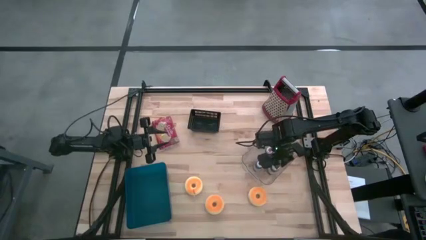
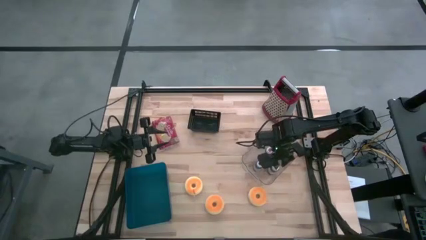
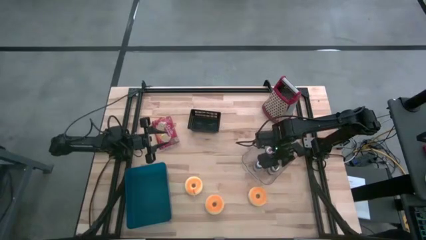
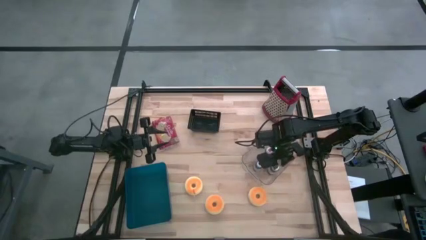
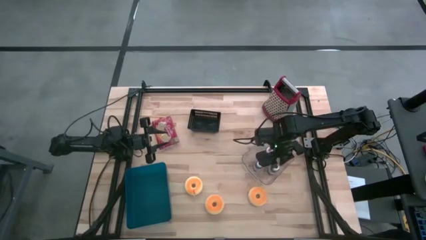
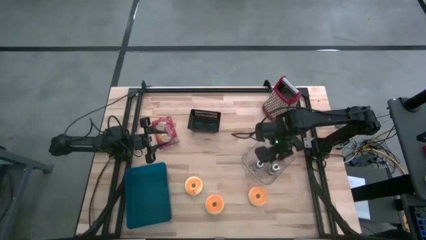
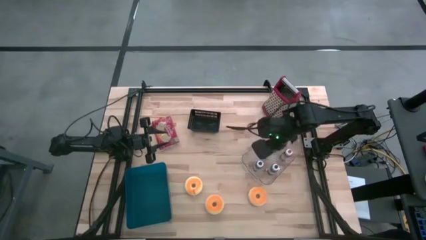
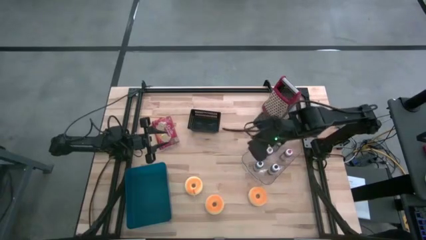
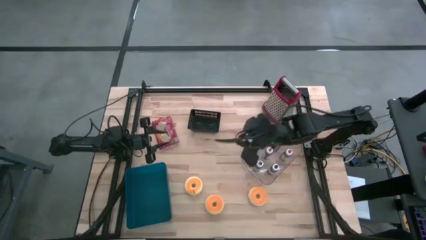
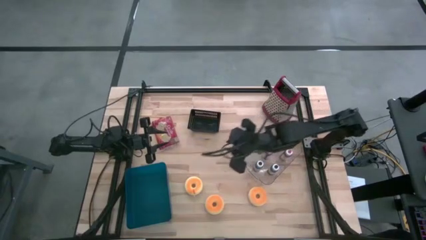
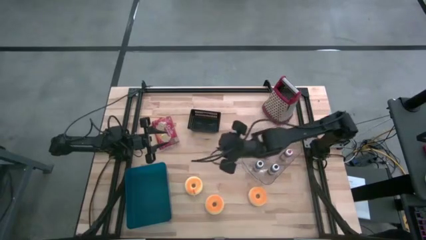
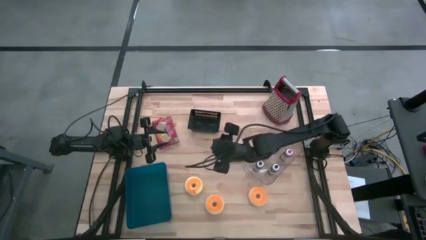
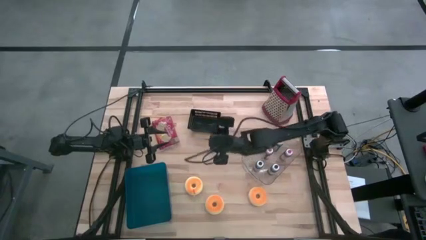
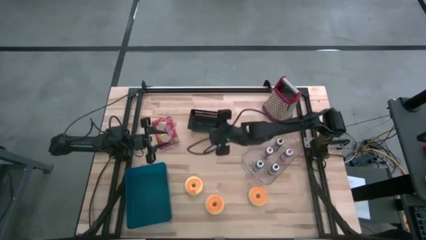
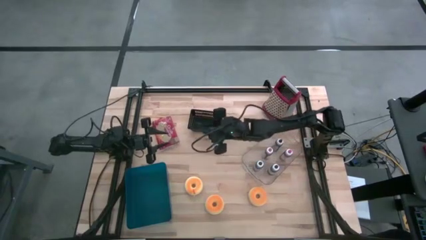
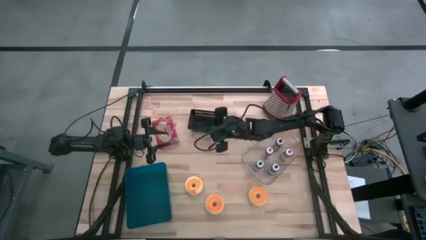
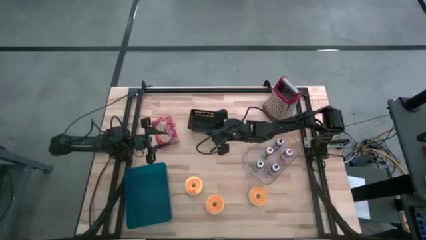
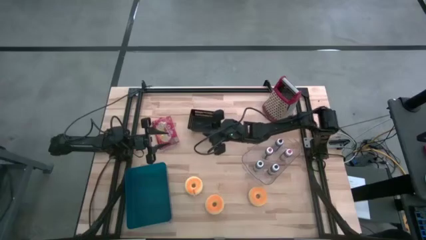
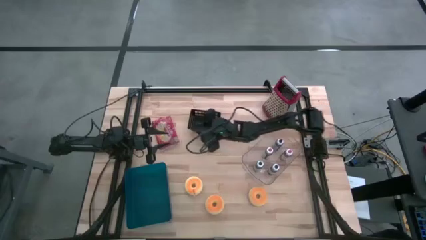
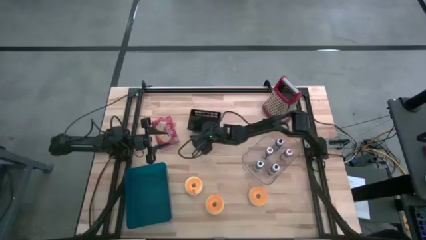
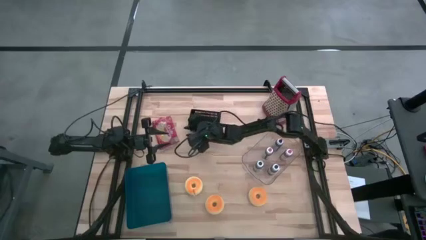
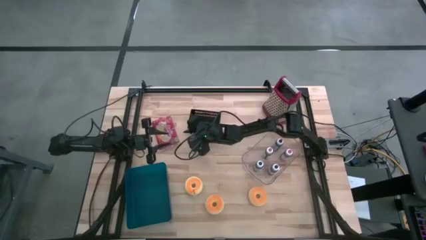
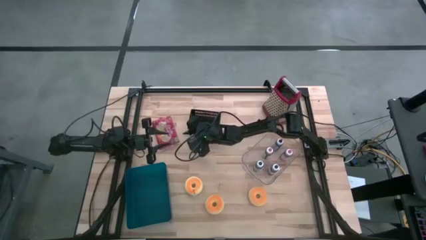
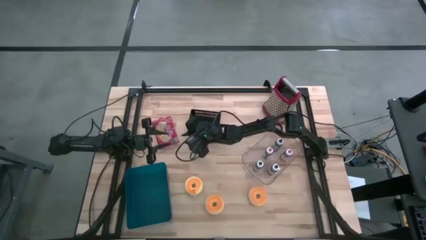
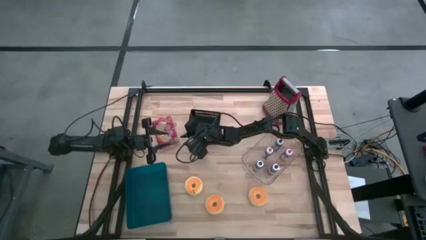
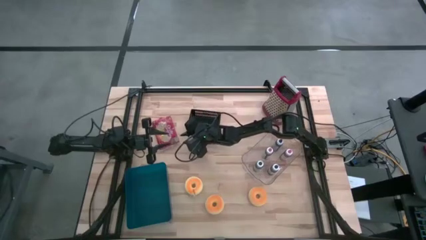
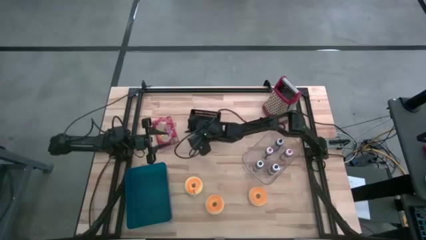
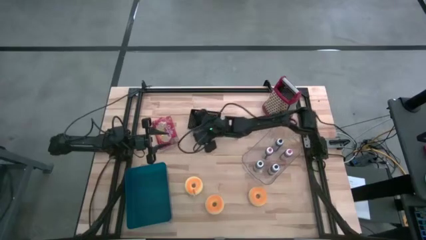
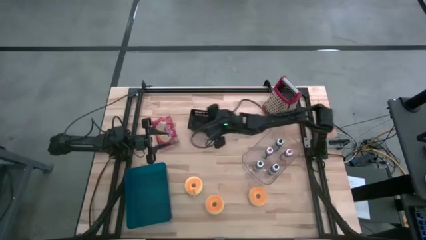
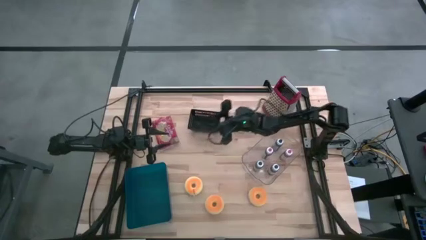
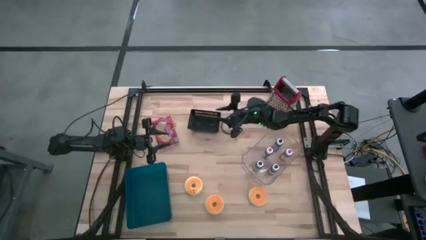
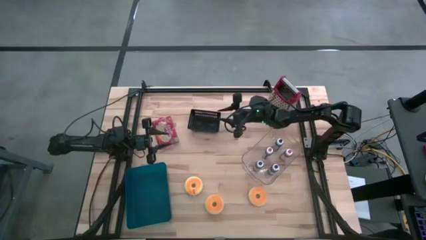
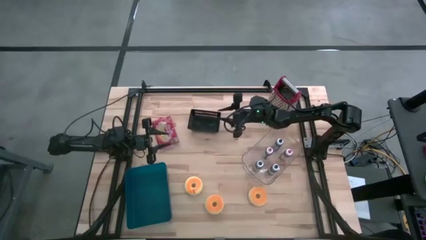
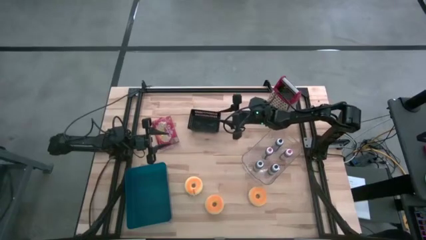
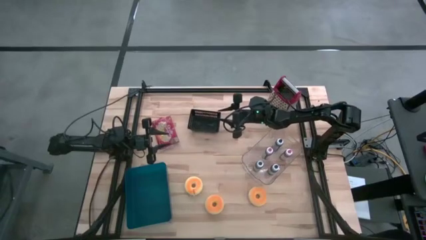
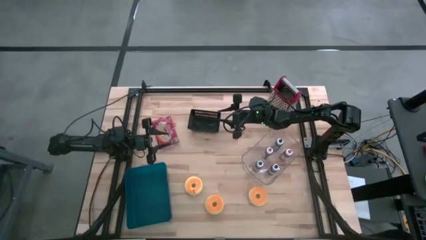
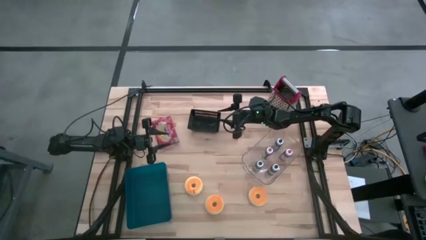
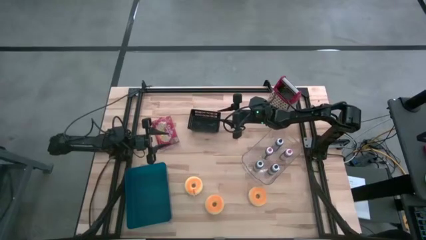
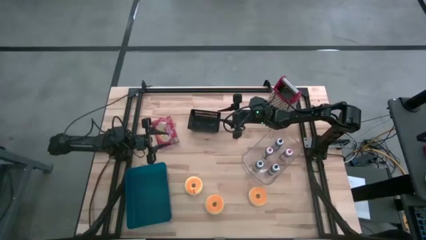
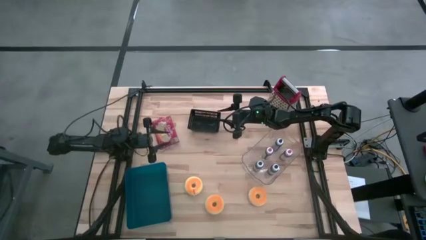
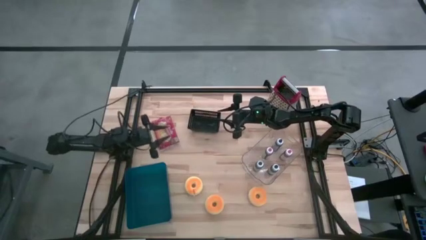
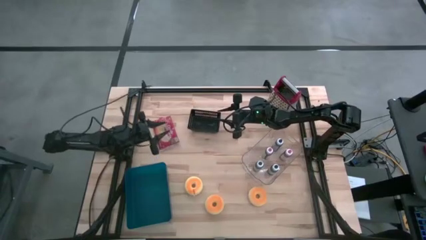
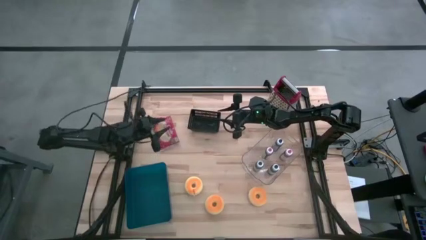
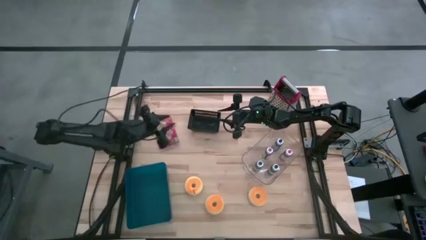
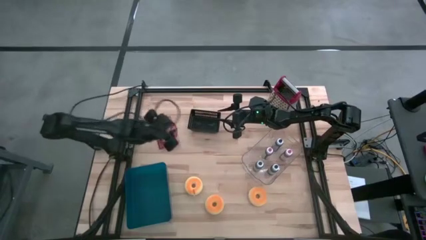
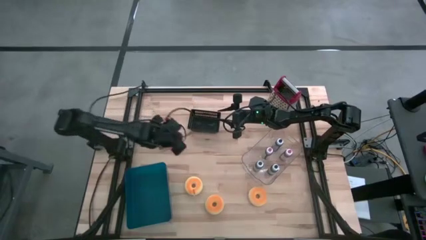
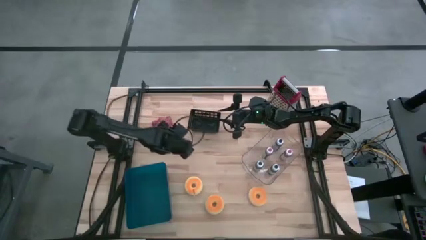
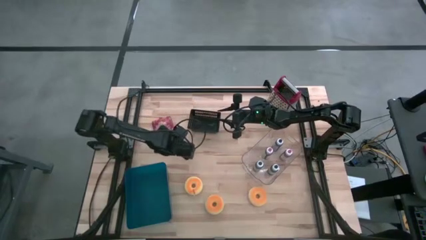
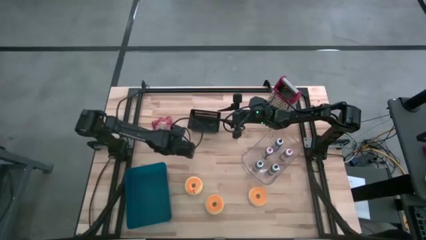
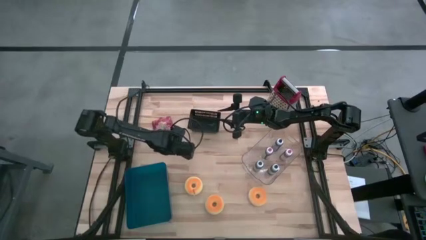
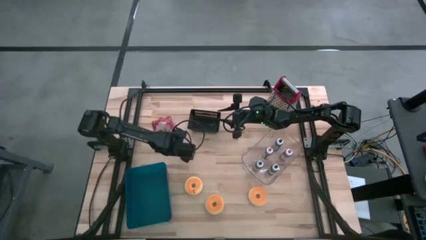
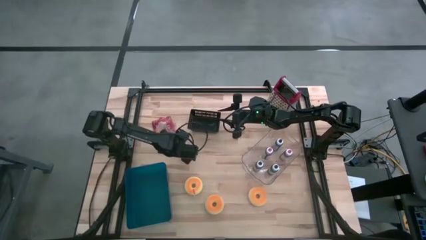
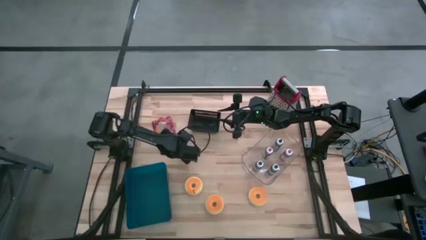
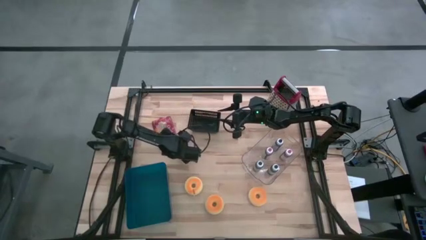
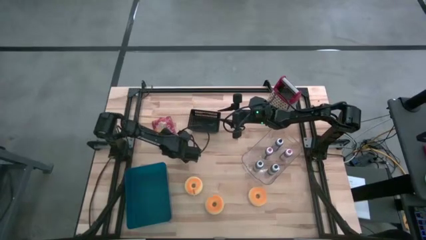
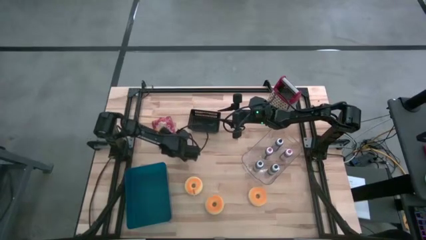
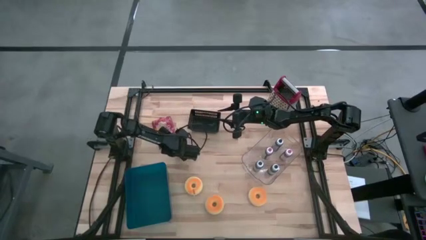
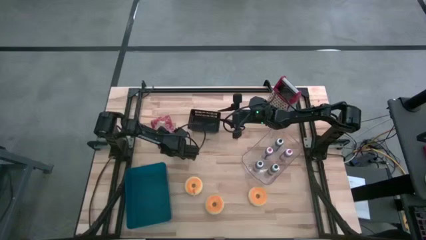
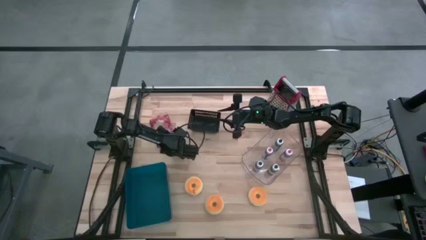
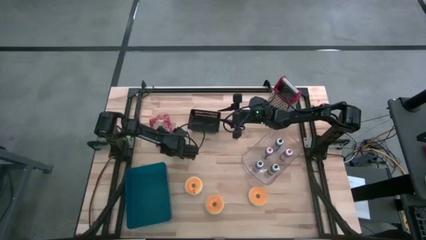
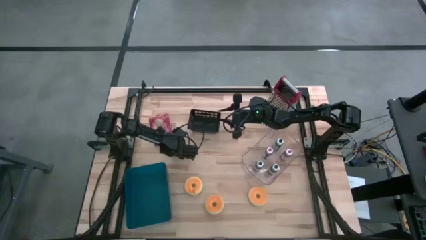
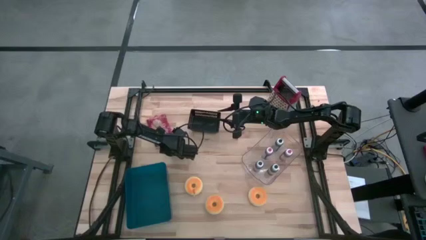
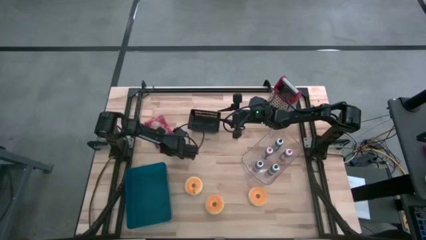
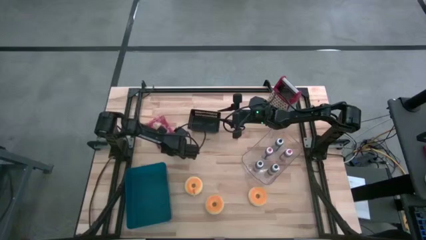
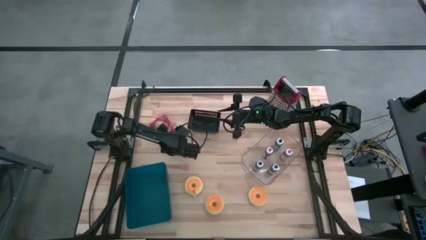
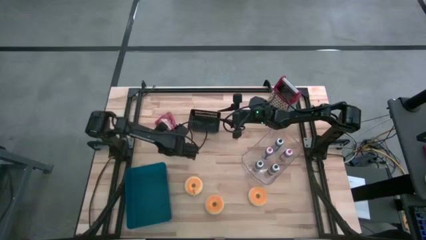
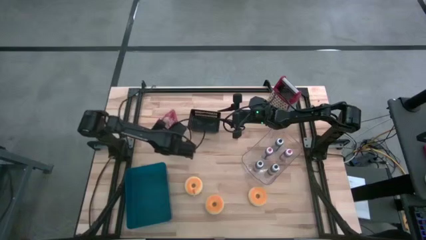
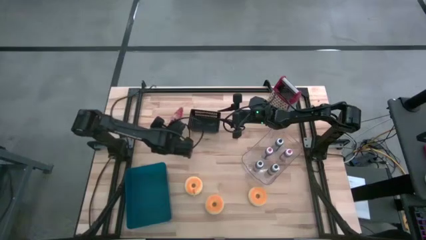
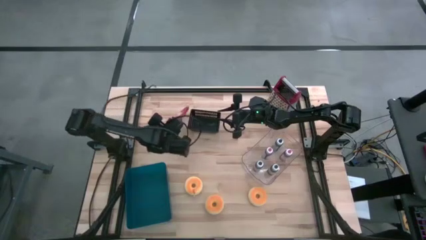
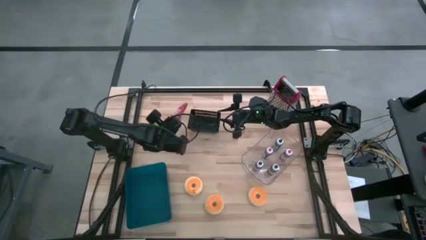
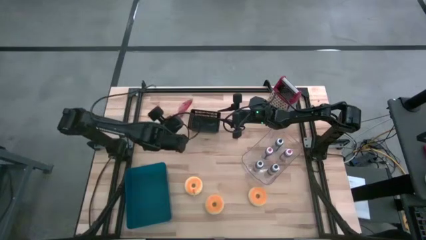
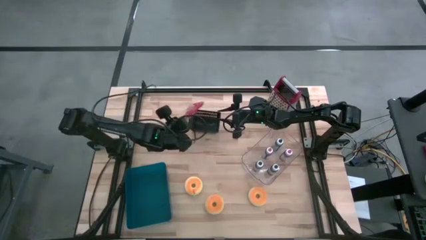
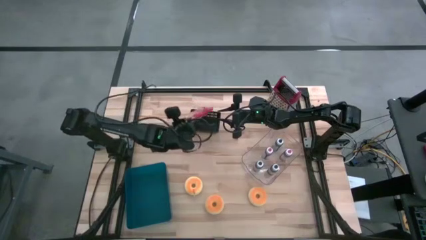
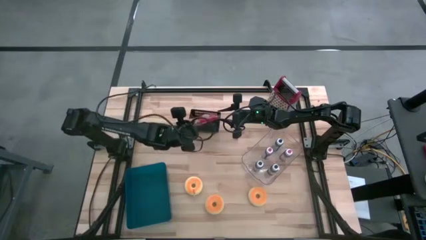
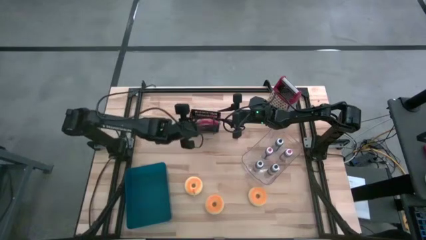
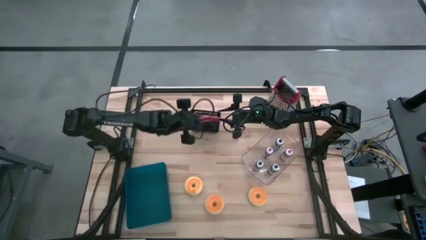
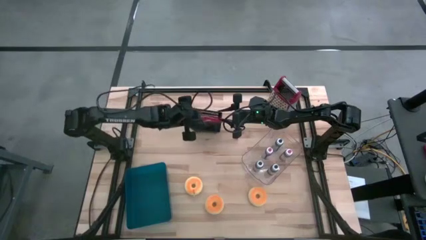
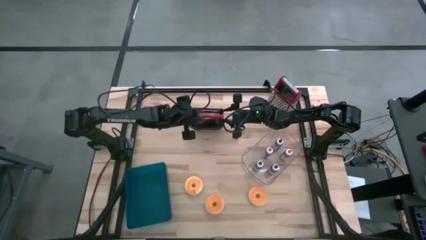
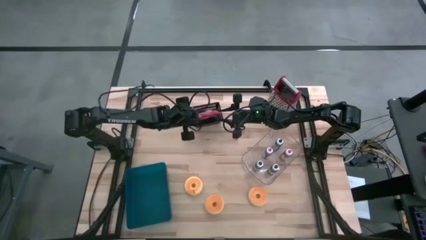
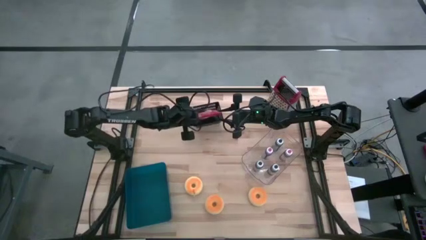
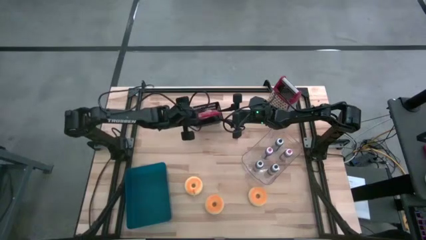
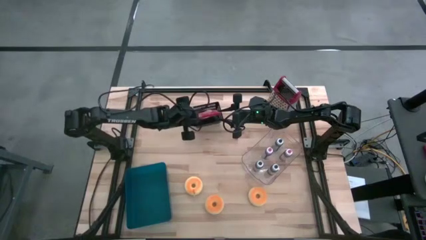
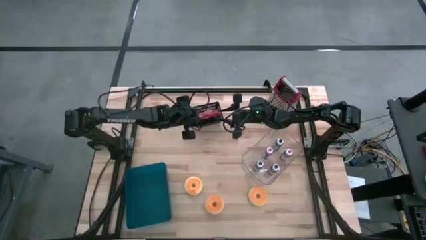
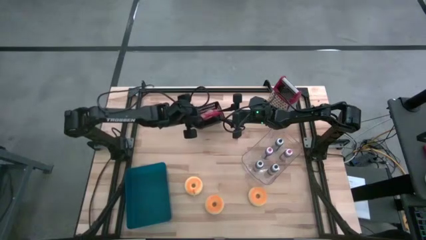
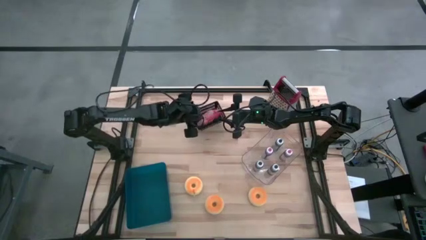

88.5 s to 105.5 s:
Task: Pick & Place Food Item
Put the red popcorn bag into the black bin
